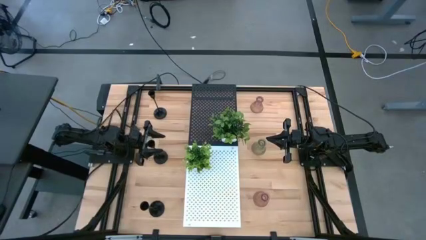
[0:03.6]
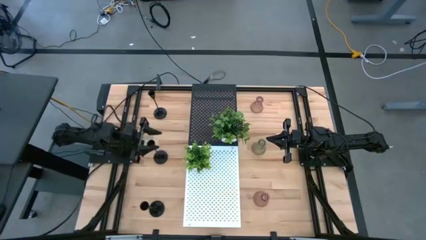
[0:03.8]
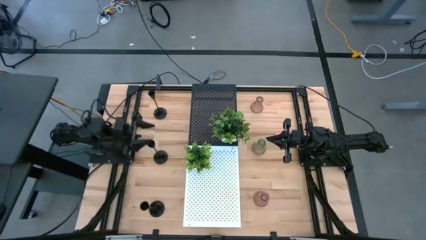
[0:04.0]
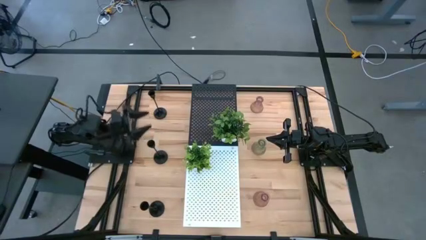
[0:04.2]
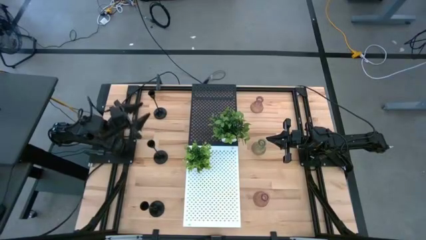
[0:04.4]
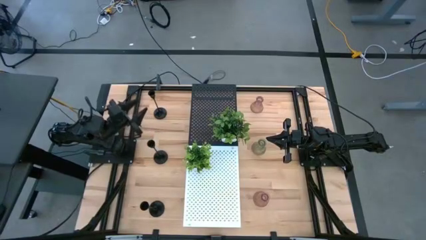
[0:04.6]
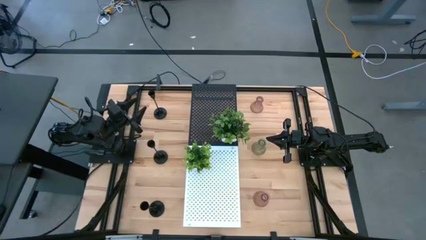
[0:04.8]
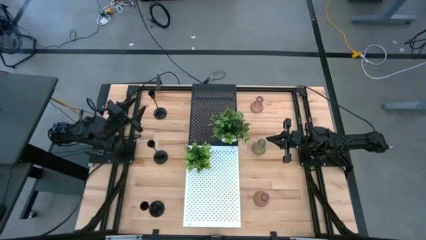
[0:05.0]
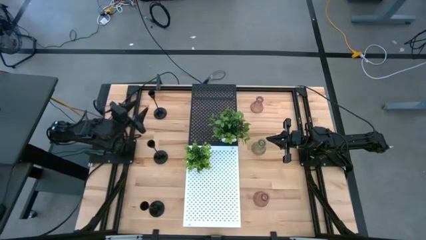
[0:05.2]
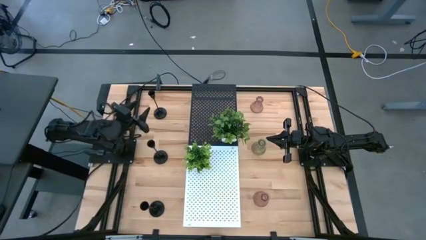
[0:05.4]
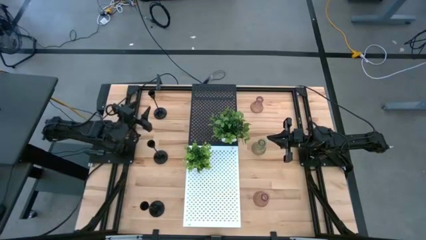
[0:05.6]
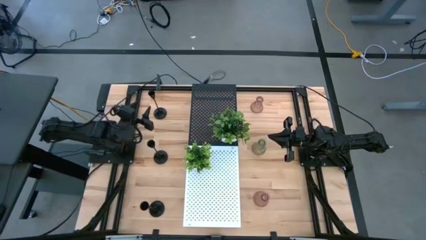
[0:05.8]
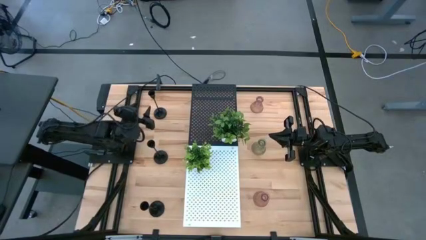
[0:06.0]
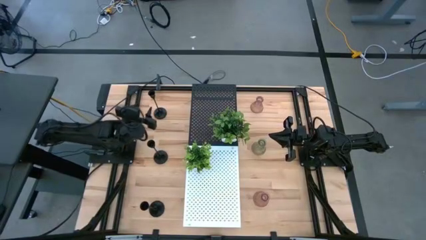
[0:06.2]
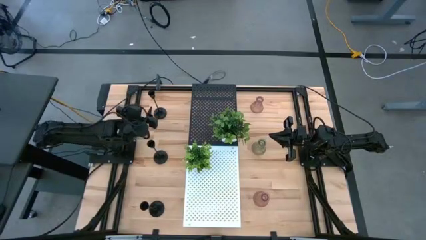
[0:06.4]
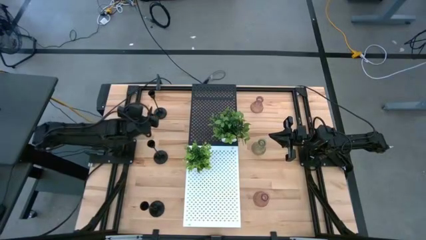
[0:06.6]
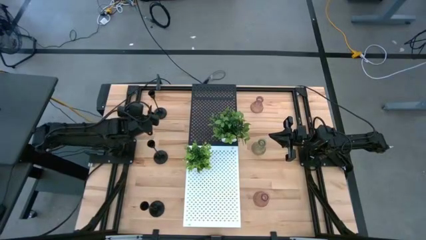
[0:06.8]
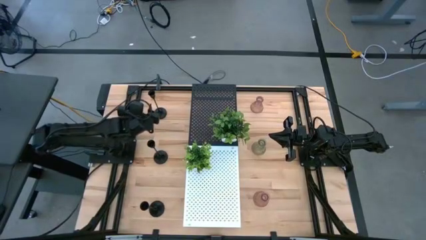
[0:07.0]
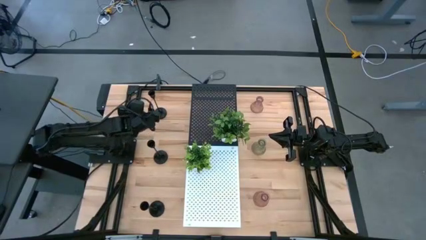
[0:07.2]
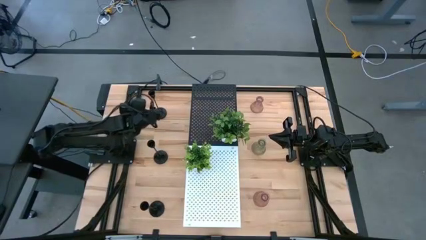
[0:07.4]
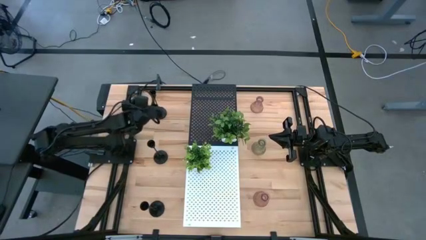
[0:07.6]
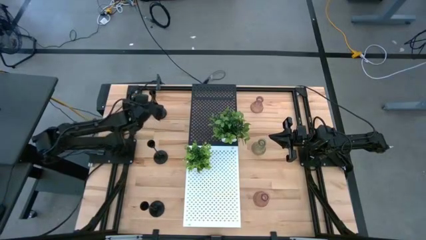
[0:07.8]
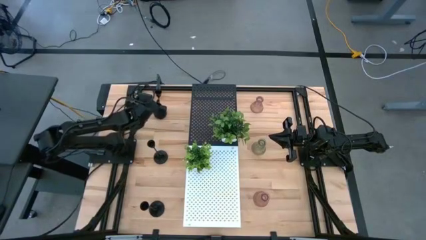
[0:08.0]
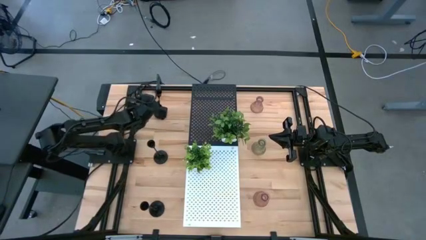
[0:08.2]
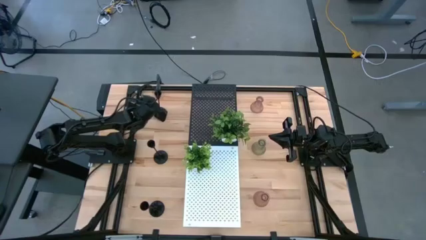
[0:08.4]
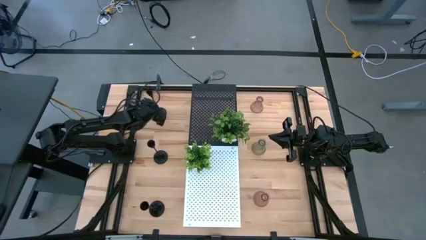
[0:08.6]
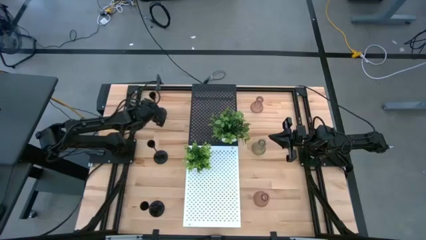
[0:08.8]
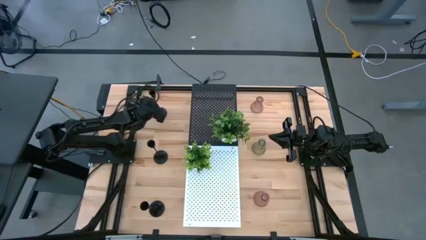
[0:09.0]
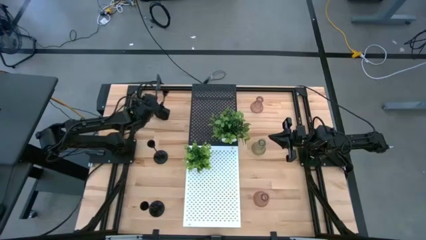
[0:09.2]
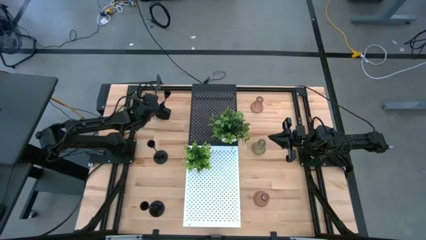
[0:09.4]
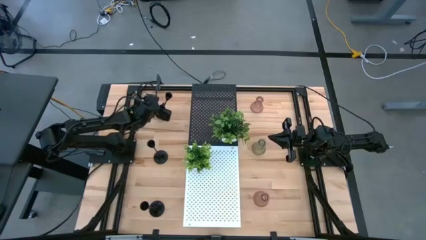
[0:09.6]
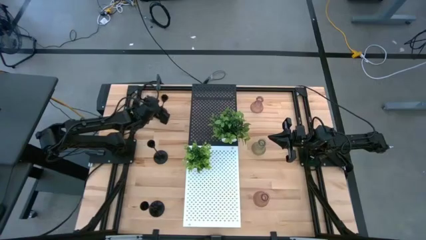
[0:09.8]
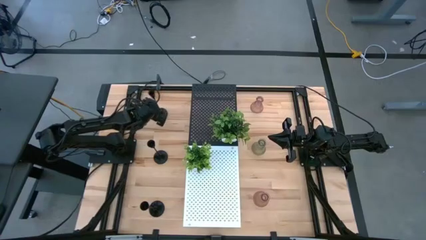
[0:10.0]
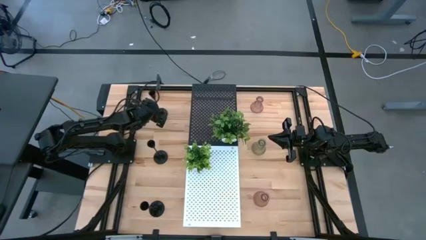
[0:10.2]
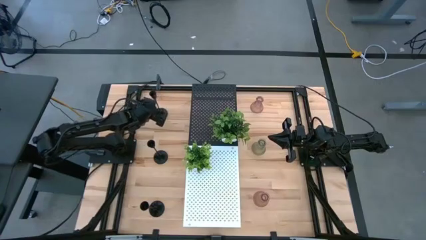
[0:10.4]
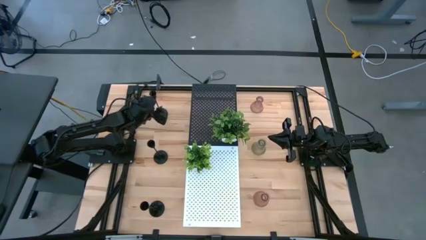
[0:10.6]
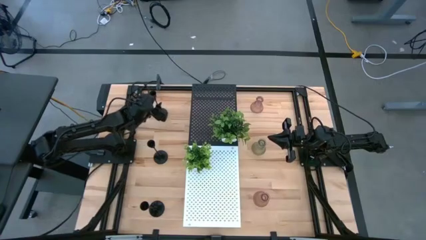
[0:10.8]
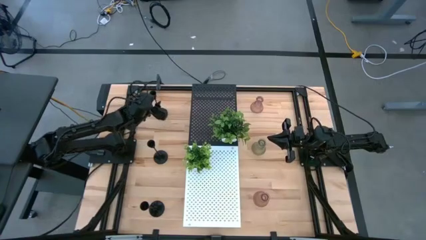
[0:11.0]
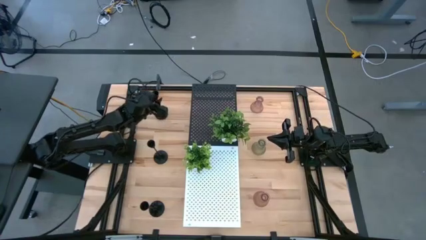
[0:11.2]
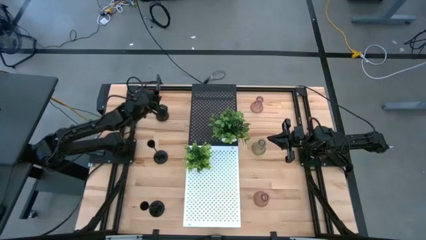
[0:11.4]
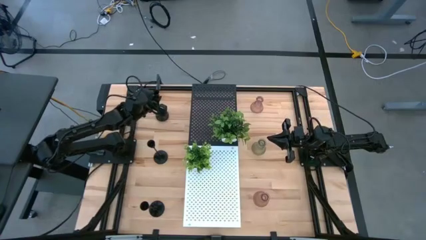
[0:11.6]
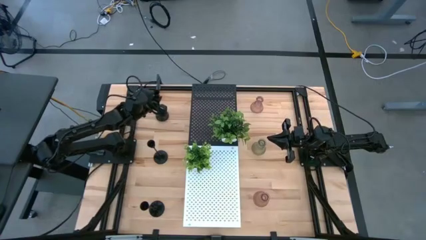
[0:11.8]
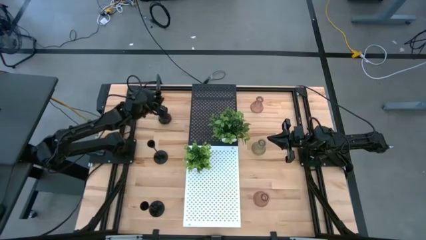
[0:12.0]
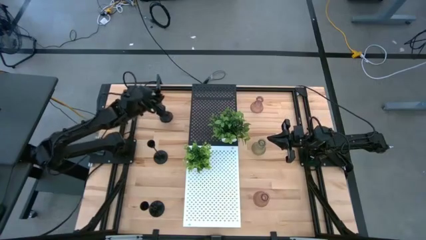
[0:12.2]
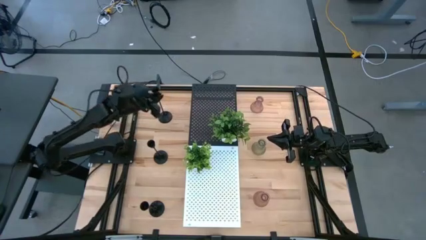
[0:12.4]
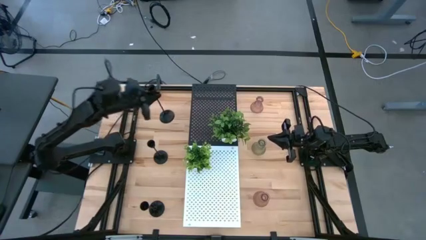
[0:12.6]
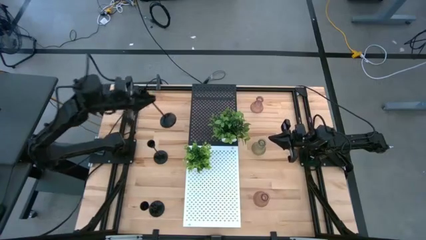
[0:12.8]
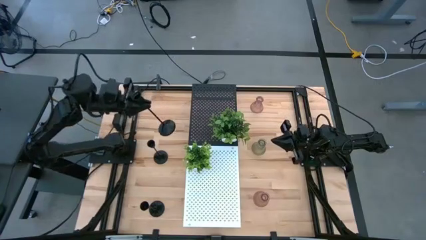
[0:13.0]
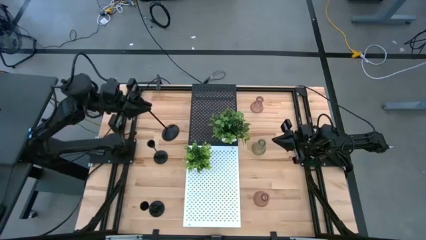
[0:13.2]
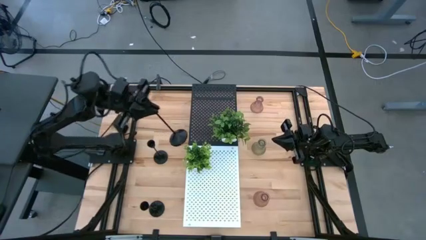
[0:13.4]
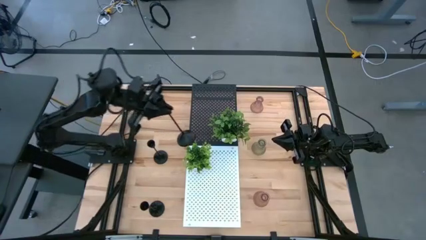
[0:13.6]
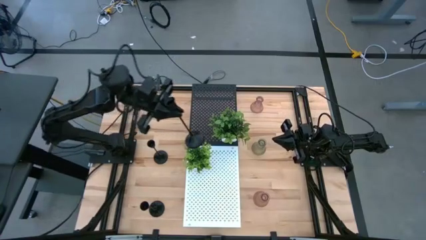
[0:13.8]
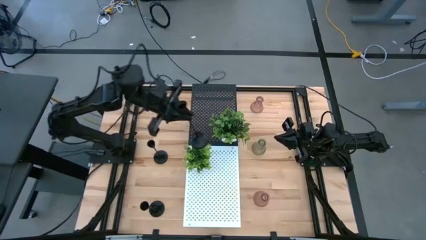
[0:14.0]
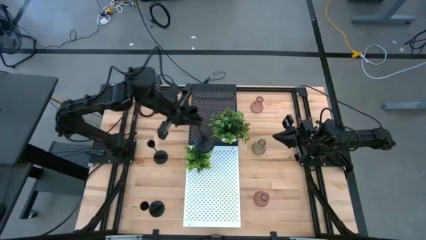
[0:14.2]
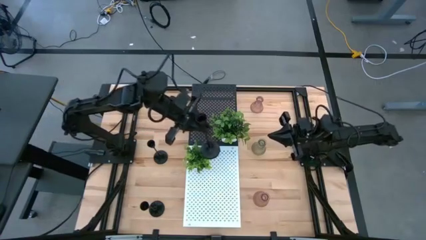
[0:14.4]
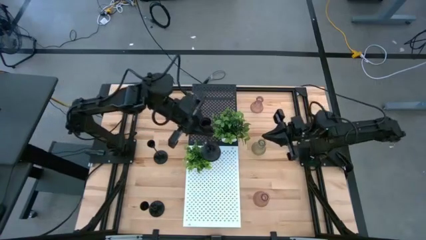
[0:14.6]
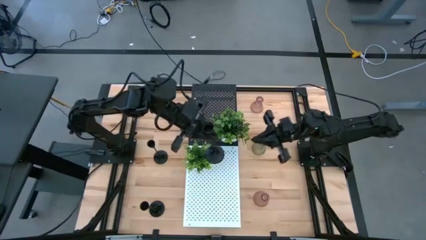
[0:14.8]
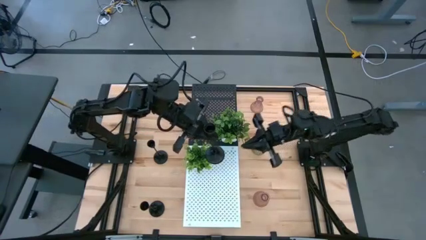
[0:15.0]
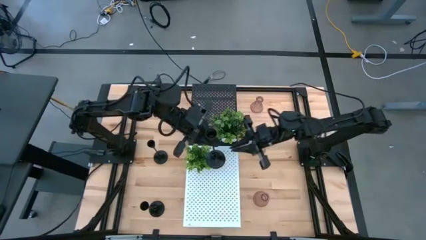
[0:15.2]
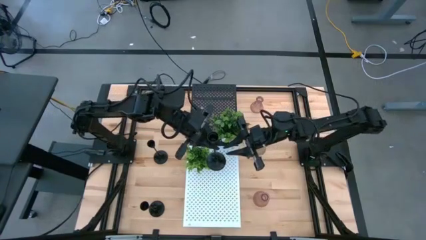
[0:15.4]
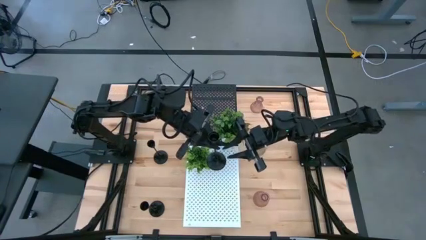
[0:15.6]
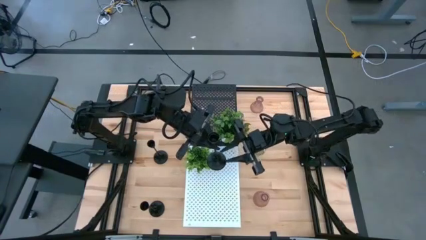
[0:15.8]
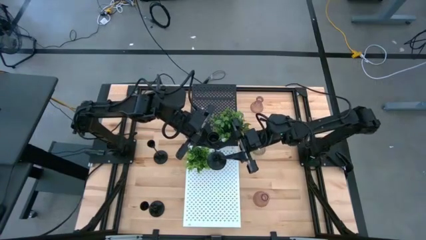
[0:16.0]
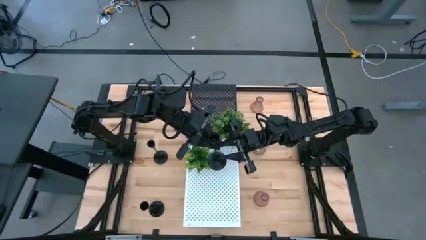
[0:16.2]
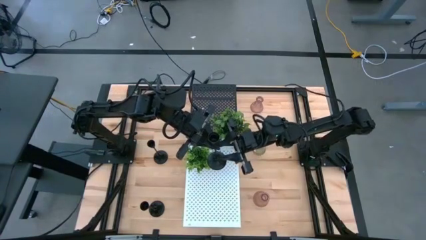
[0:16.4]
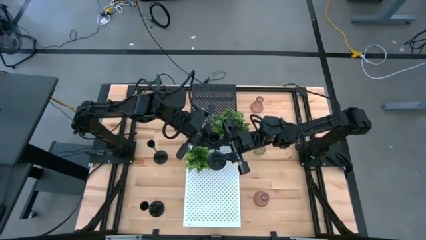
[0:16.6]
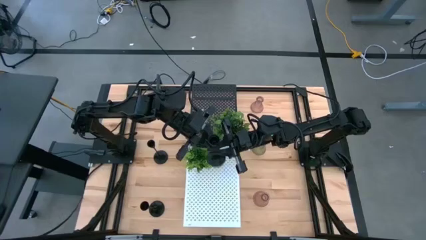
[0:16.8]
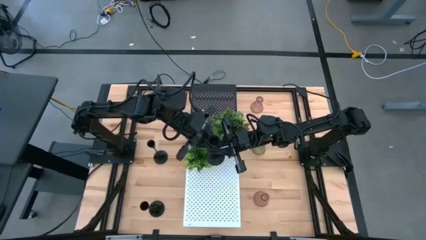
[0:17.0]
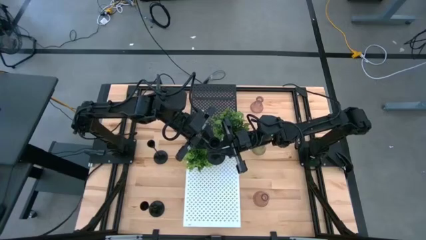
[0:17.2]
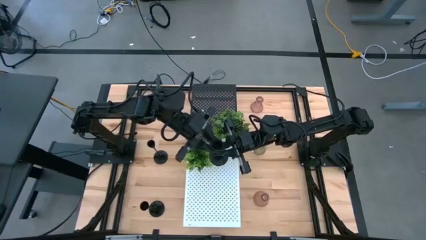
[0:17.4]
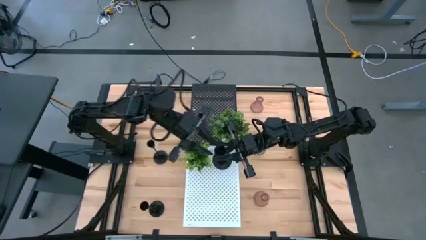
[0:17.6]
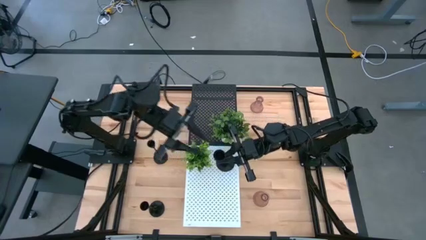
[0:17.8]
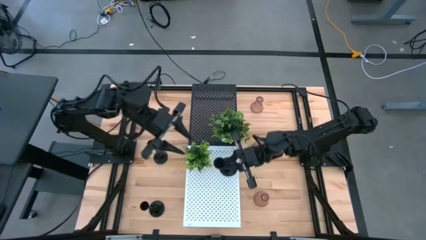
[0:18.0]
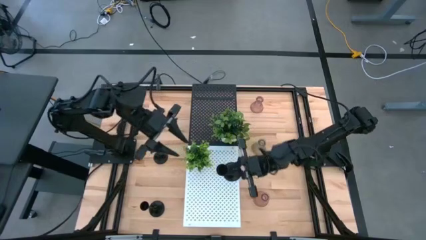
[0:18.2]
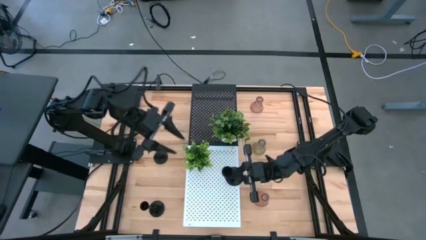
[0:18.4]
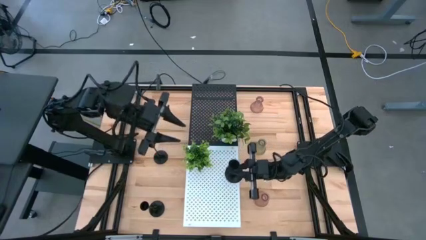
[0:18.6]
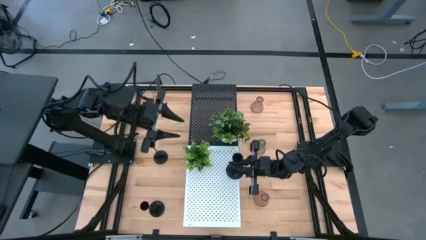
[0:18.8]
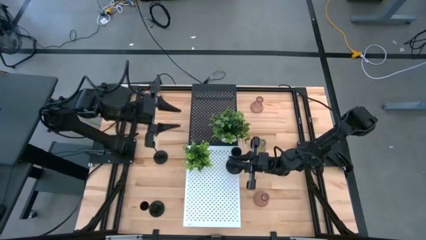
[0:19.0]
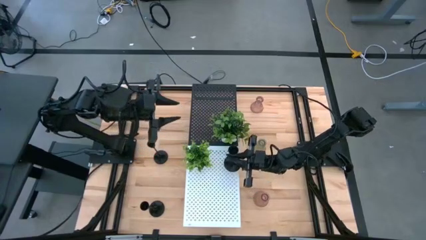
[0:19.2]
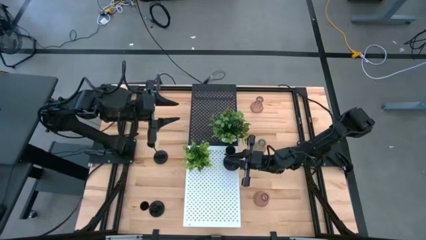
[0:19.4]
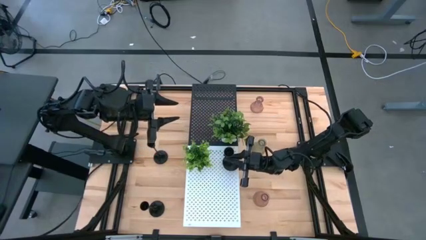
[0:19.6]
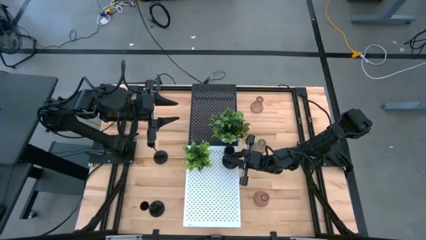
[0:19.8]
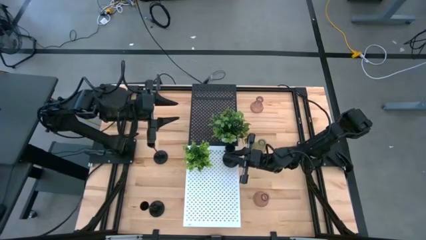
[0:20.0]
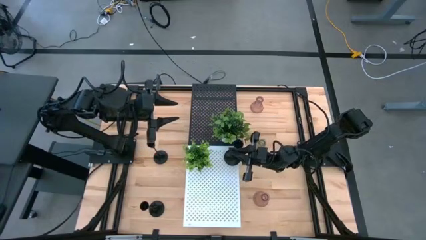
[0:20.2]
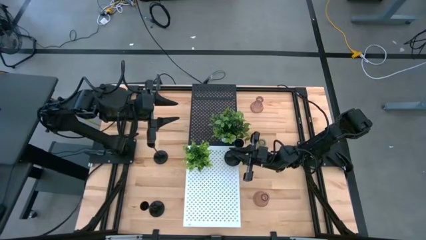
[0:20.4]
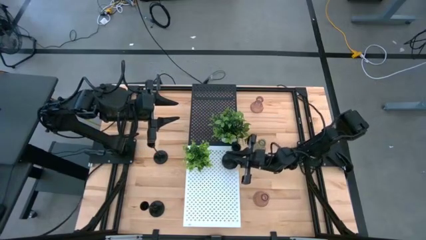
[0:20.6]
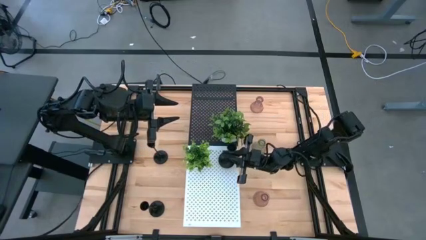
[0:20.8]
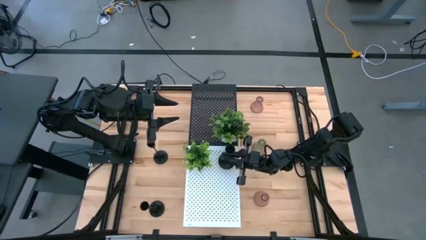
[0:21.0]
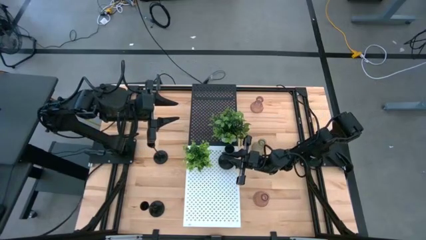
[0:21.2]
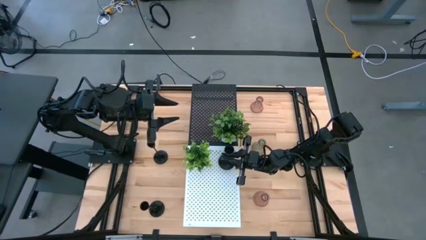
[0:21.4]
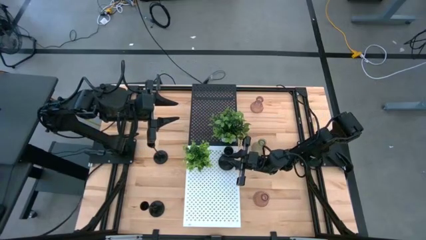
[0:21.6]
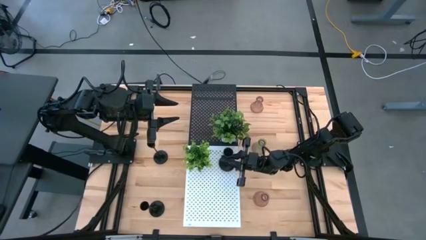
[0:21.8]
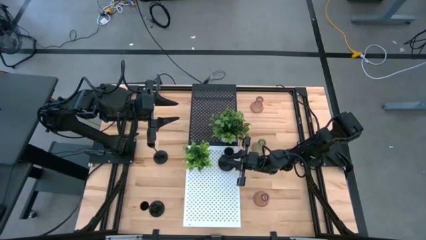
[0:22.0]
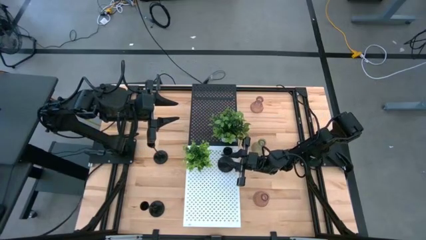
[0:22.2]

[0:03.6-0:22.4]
Task: Pick & Place candle stick holders
Put the top black candle holder on the white shelf
